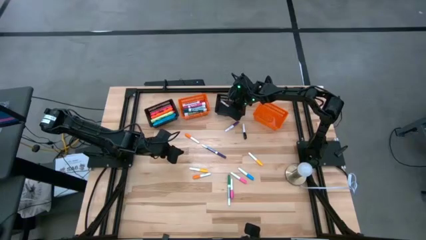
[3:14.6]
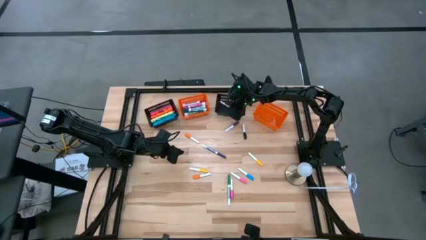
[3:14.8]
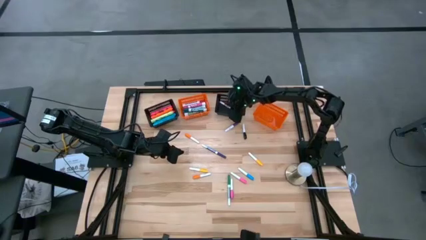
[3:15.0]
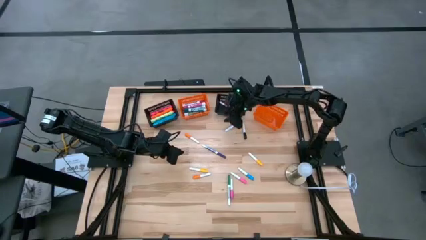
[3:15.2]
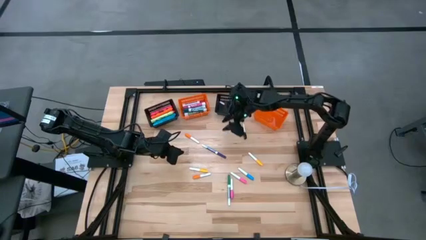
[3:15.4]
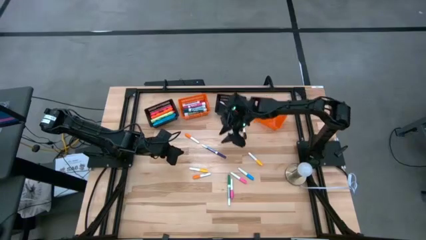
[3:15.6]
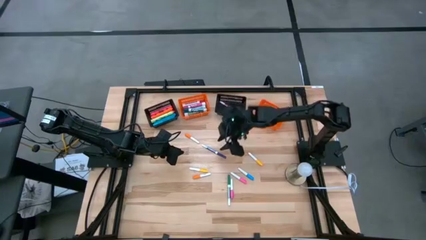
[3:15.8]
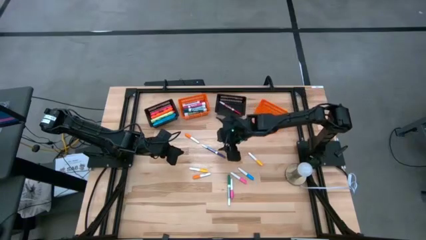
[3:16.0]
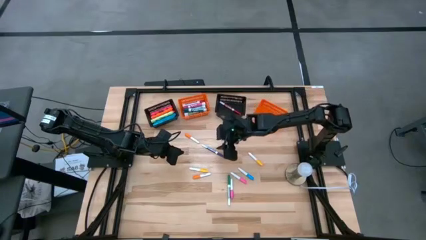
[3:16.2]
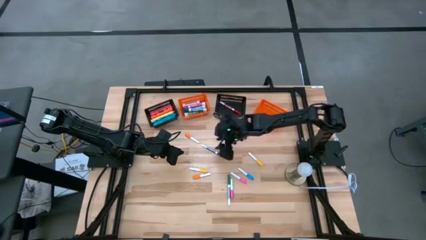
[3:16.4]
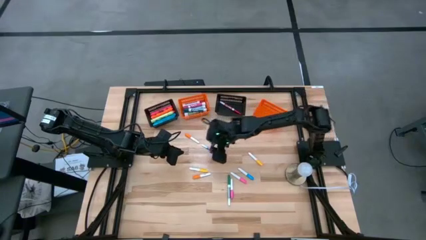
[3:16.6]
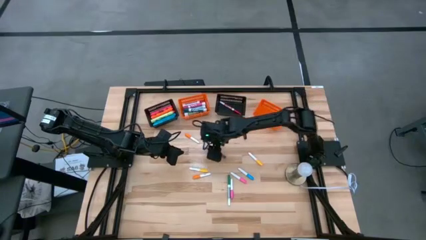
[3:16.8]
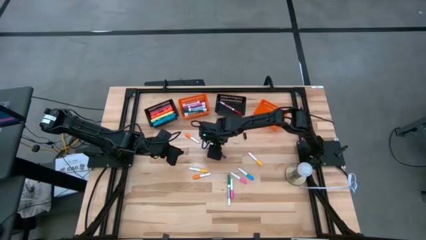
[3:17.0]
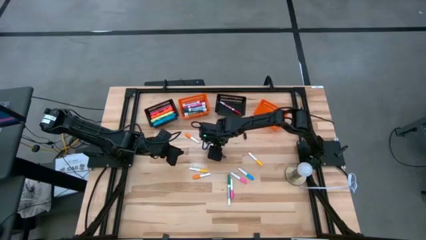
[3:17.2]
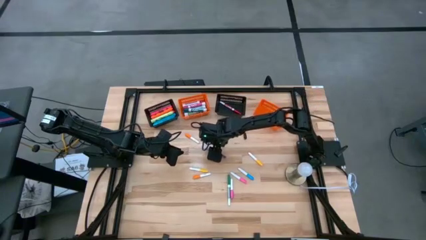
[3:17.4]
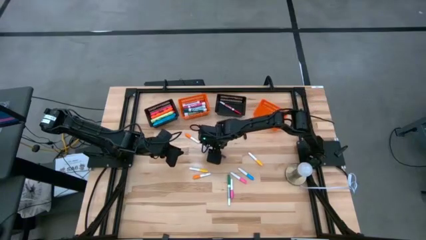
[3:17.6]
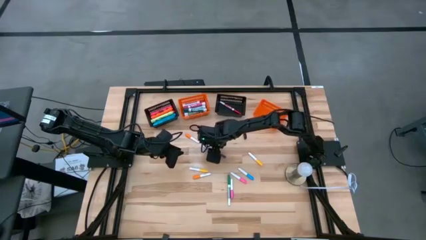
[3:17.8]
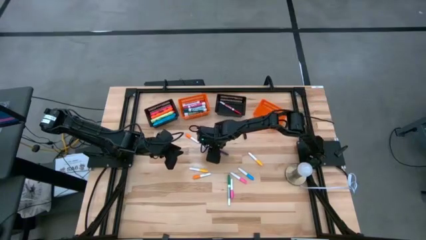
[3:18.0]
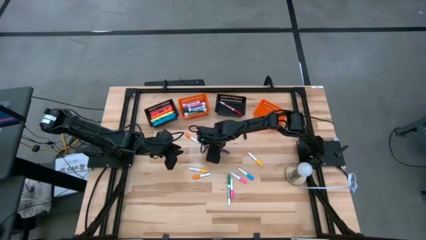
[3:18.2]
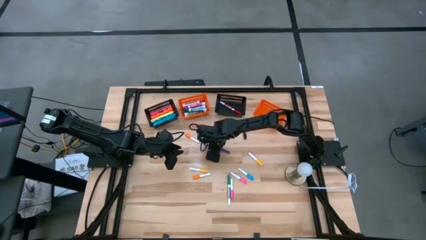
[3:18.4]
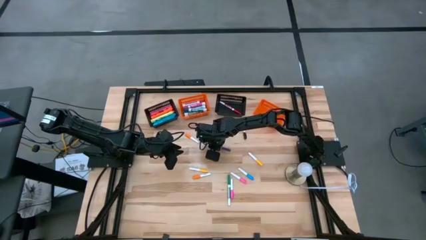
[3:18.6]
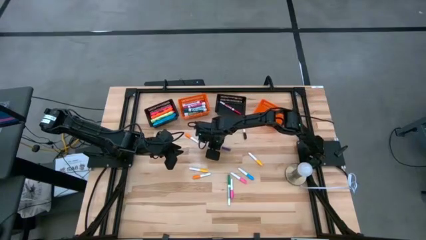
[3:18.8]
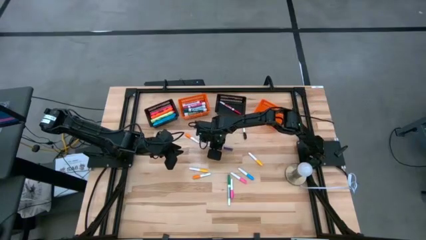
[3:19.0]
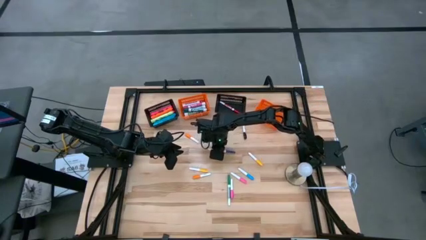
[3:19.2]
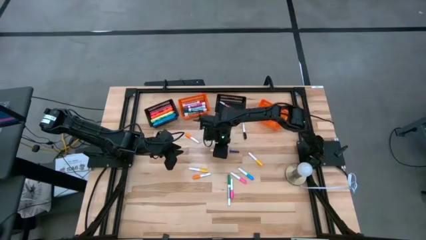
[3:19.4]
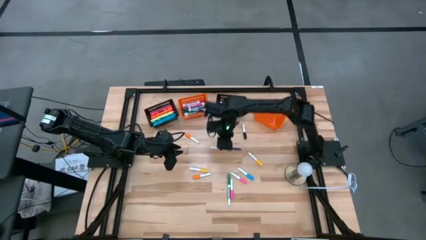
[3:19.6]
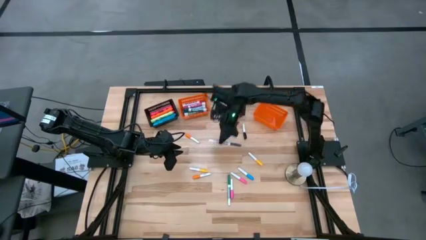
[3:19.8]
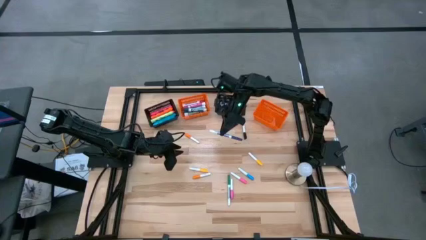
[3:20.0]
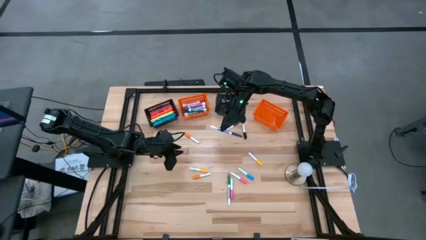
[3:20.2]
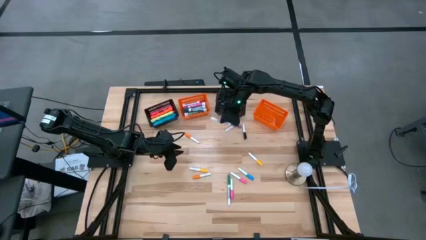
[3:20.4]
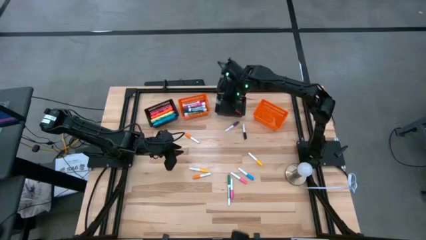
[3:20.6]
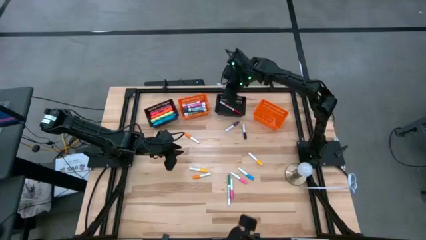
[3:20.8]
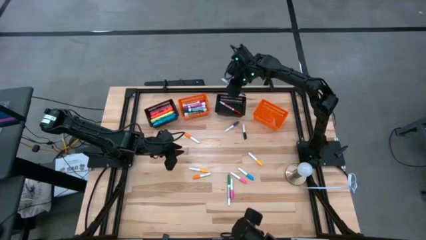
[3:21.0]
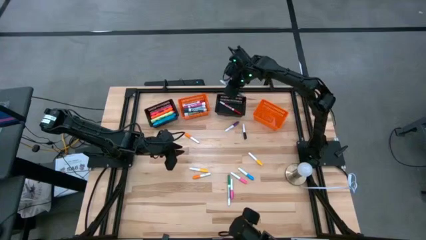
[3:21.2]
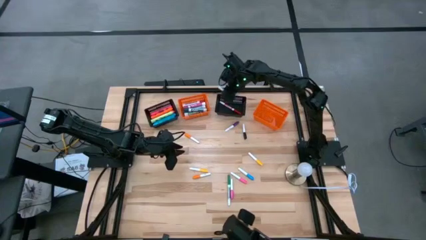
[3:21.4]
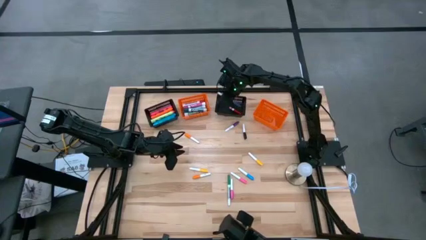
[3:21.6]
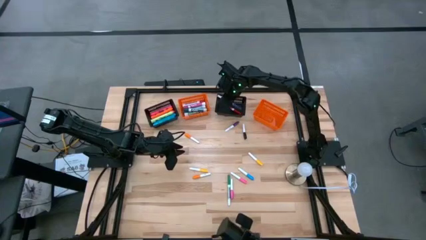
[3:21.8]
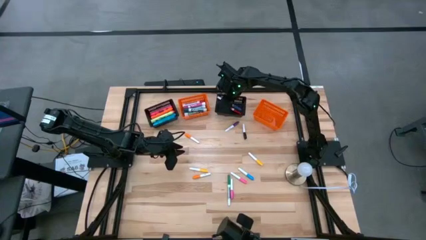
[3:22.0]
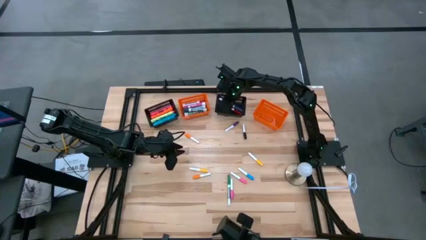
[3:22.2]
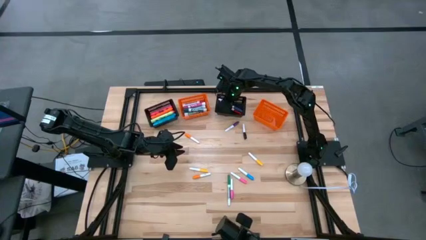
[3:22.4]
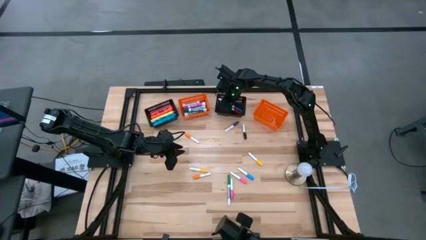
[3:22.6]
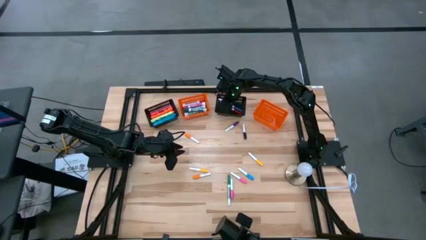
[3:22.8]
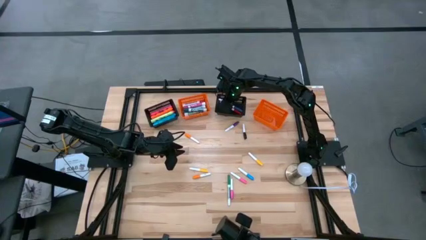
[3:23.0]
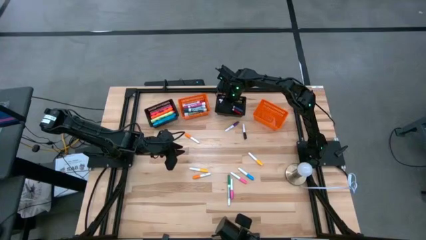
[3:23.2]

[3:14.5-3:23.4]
Task: Pick & Place Markers
Put the dark blue small marker pen into the right black bin

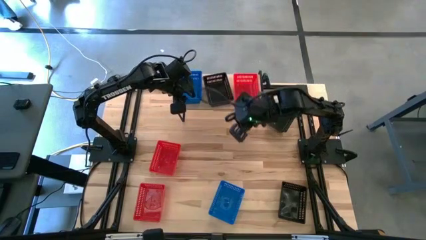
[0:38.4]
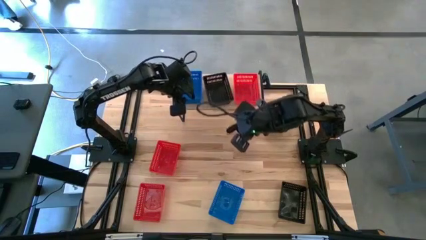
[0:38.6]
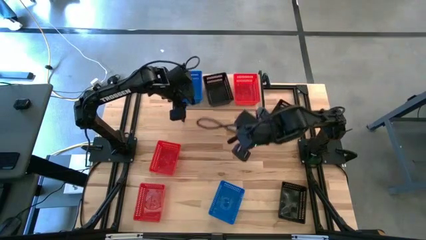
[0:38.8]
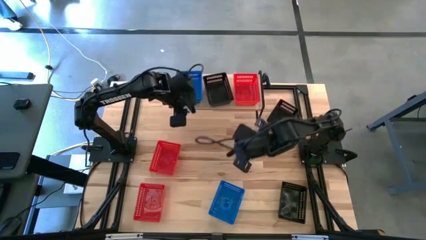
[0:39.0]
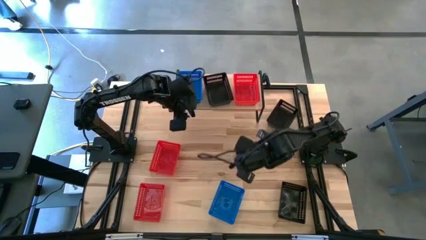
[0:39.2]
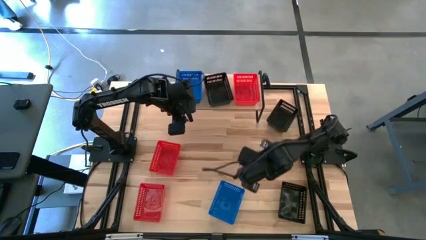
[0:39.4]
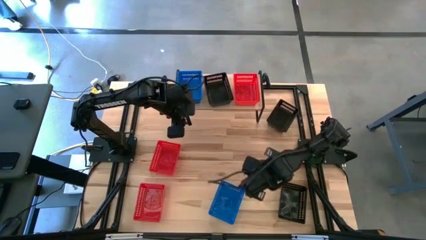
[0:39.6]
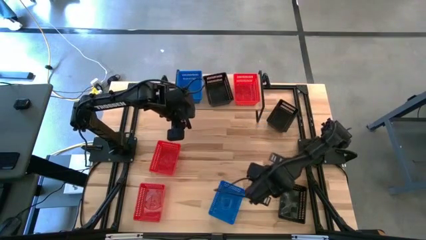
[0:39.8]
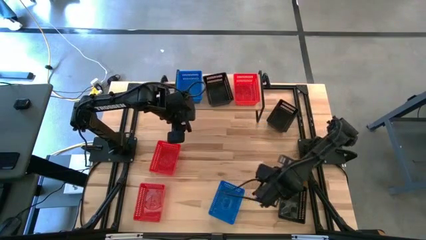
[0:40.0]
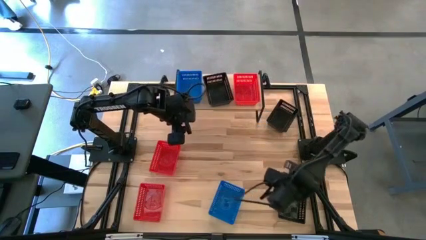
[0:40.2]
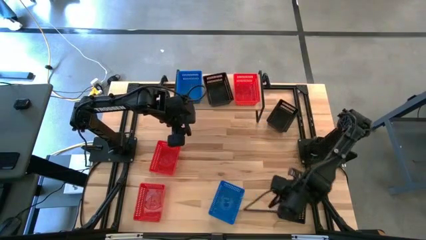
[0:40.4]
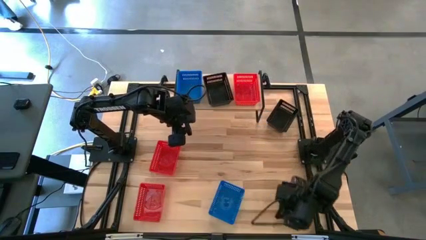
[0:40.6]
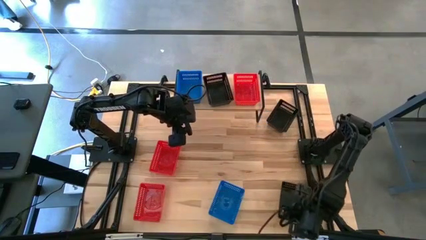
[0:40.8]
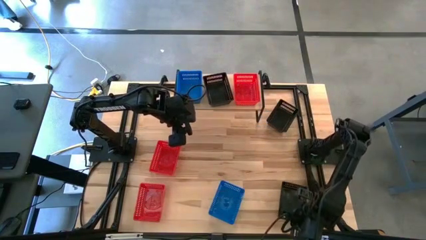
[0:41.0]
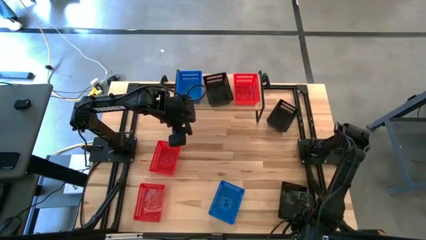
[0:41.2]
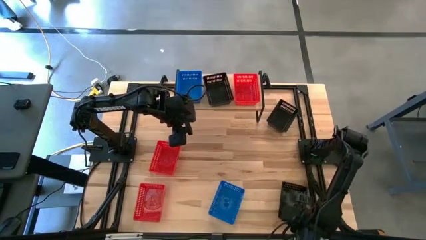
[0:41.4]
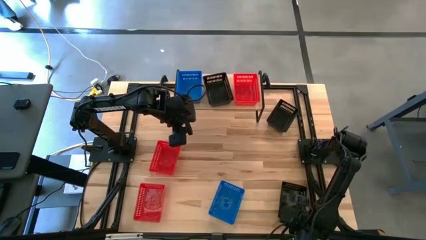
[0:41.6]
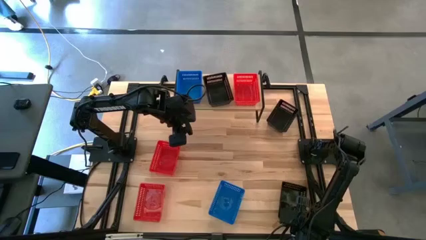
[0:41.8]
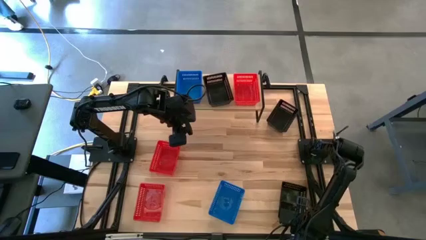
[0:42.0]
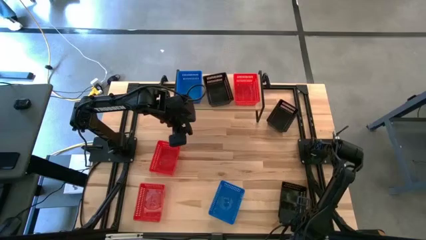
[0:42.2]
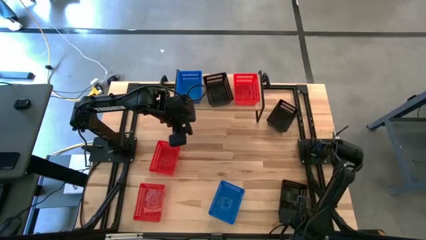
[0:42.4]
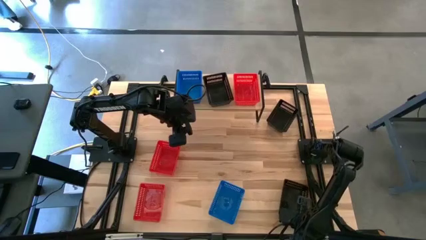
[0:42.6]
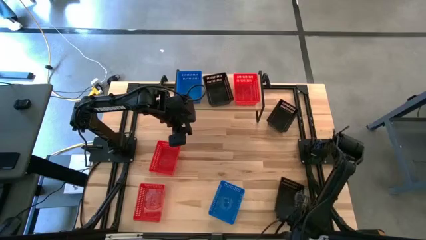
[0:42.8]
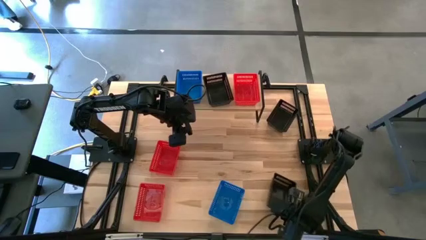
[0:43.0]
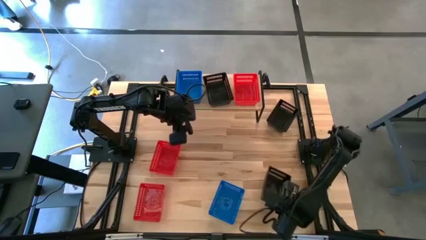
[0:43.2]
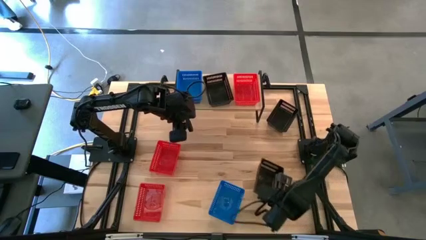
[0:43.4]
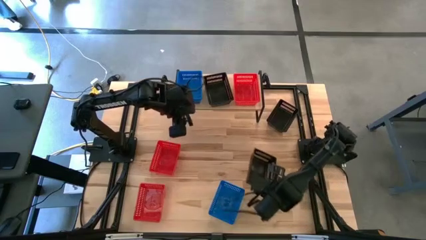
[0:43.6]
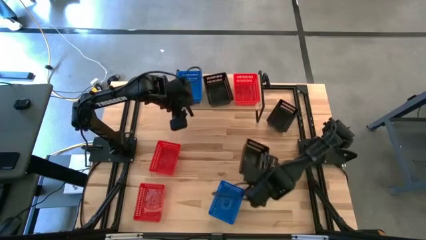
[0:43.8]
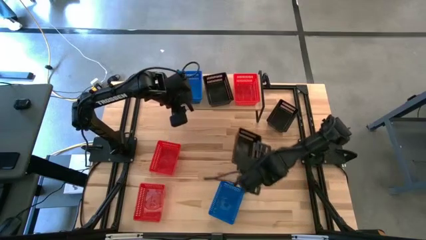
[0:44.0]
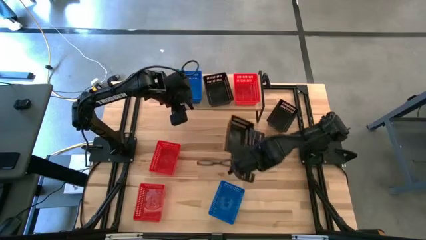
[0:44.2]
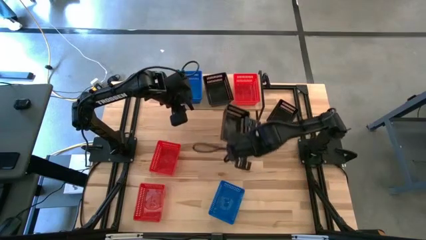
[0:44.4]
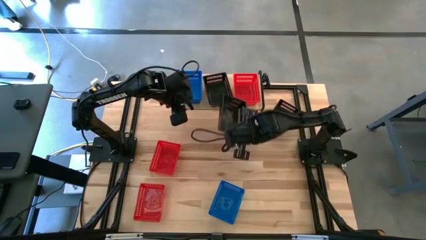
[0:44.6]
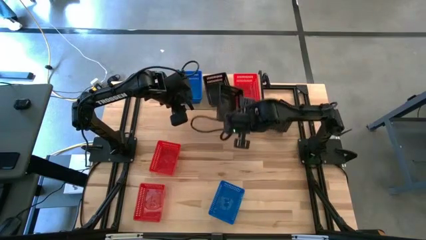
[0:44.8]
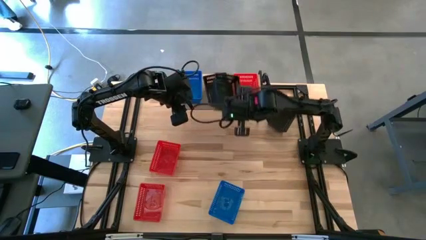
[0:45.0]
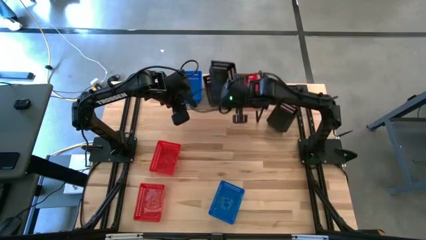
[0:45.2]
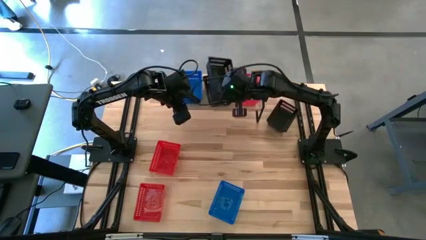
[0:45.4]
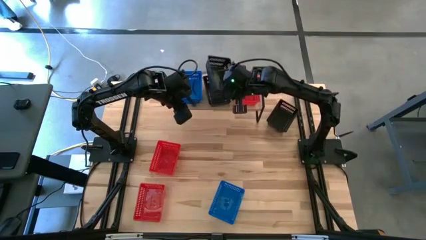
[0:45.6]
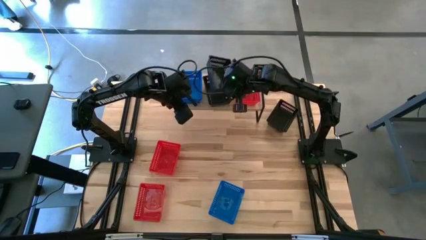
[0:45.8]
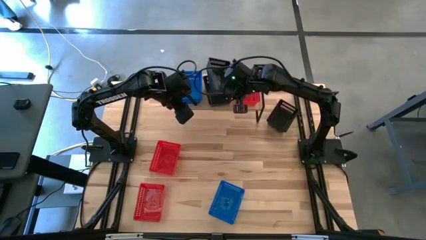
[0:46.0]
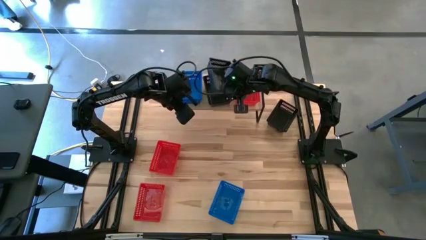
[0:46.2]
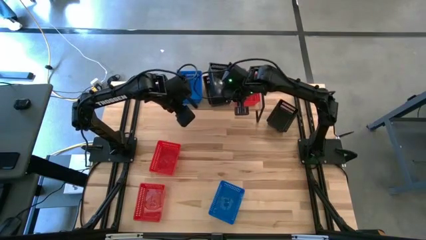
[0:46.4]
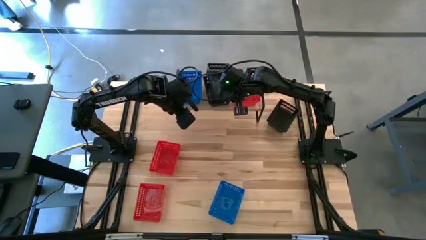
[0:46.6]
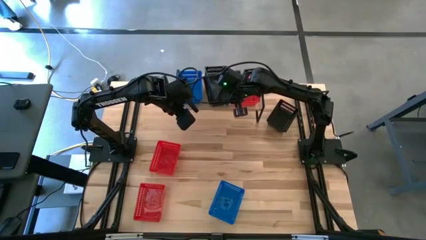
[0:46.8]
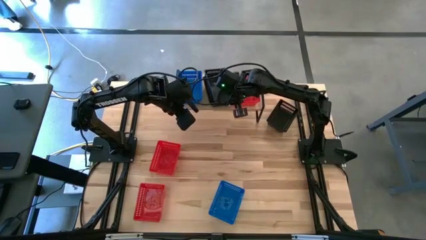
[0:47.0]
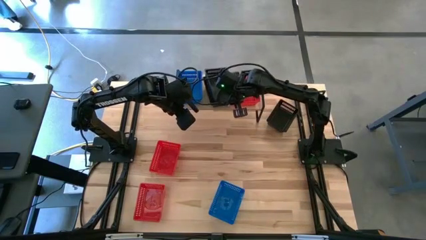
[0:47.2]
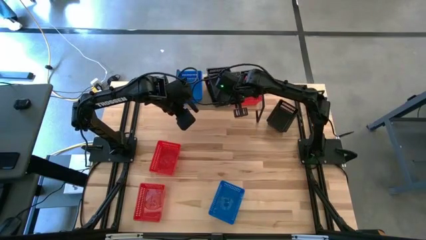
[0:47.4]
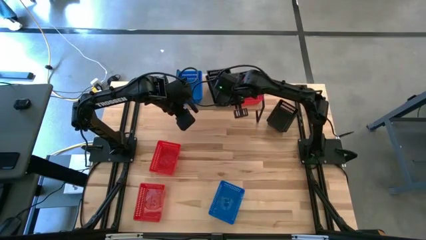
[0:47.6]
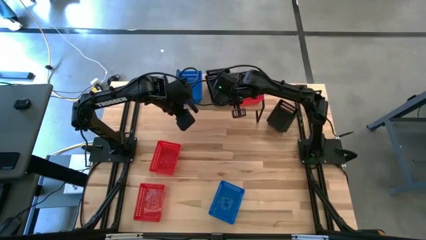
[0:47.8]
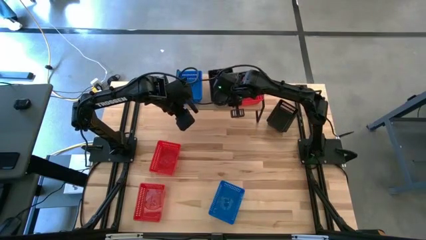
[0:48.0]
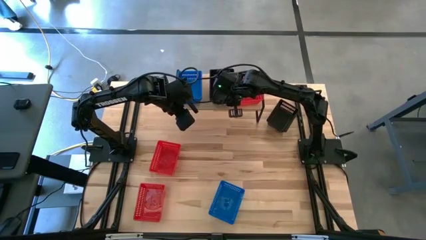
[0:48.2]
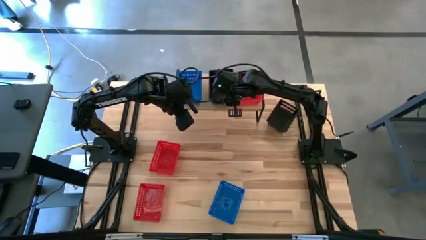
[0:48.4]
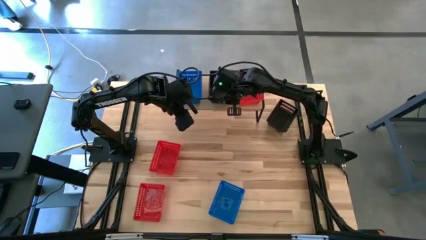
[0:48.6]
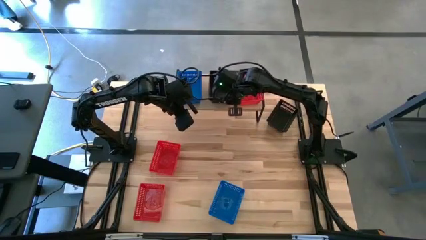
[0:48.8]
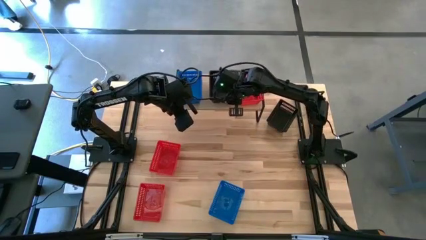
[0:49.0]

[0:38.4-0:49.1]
Task: Stack baskets on shelf by color
Stack the bottom black bin on top of the other black bin on the shelf
